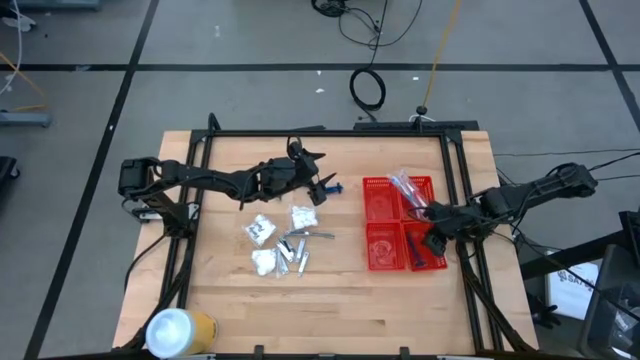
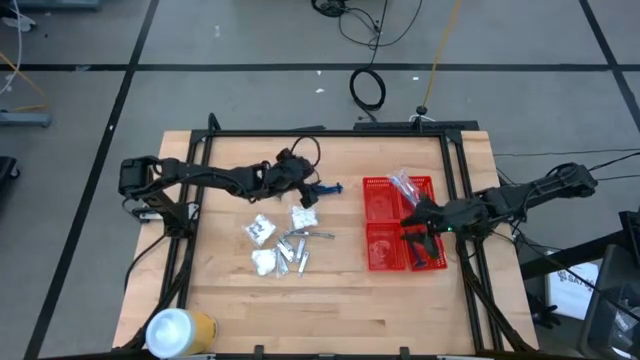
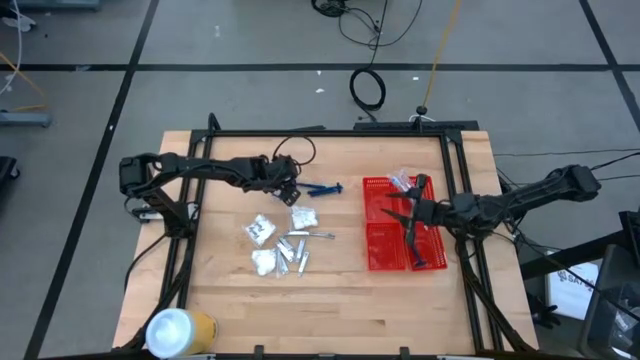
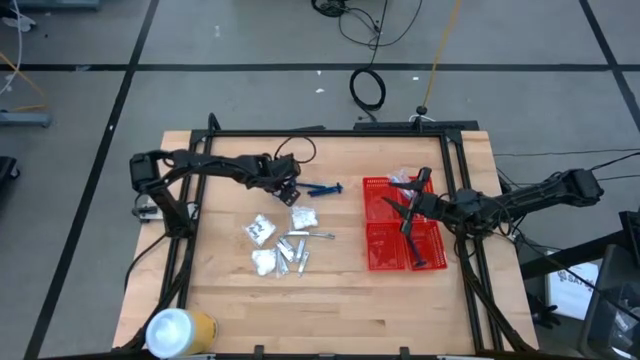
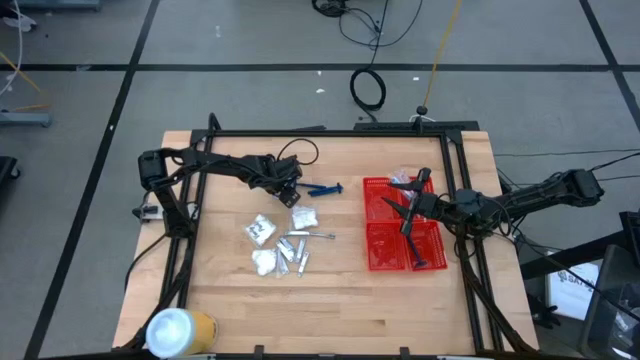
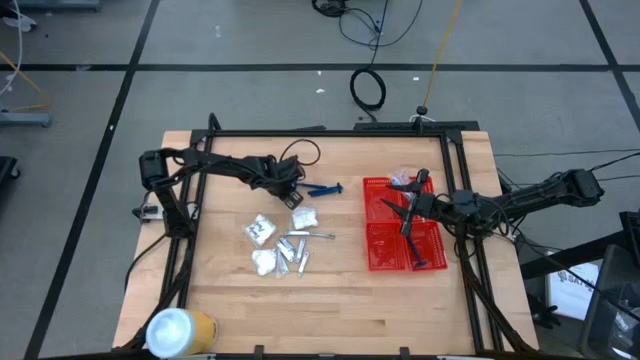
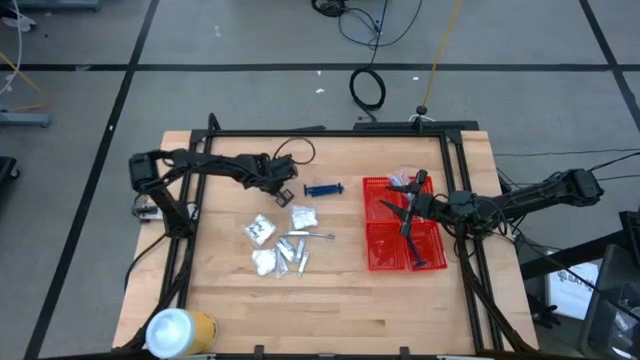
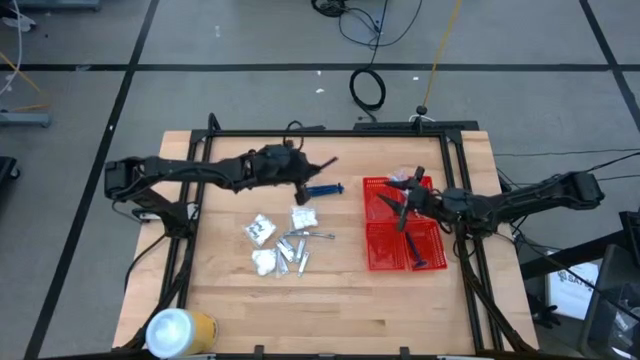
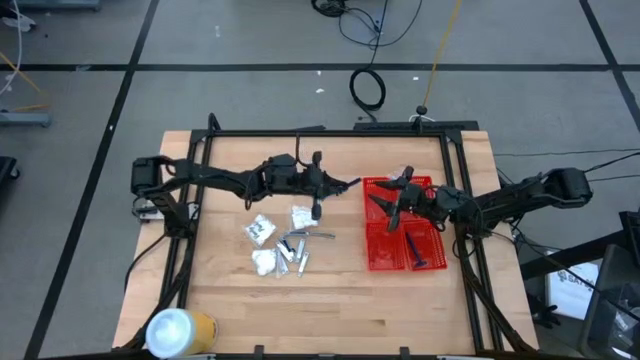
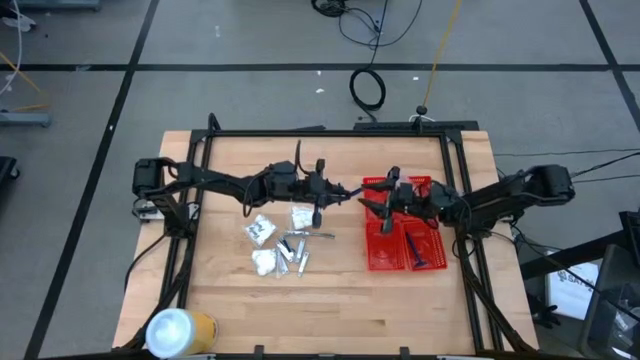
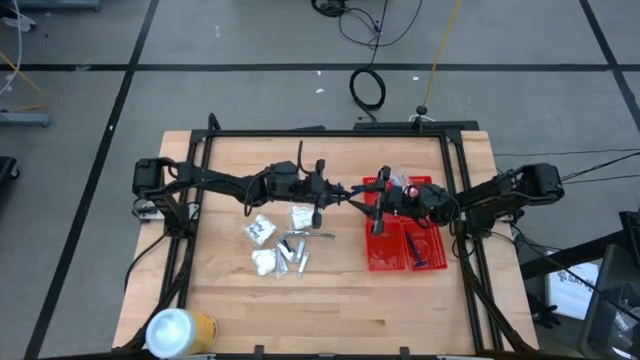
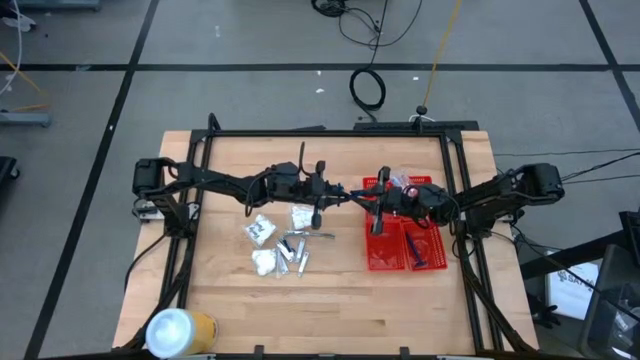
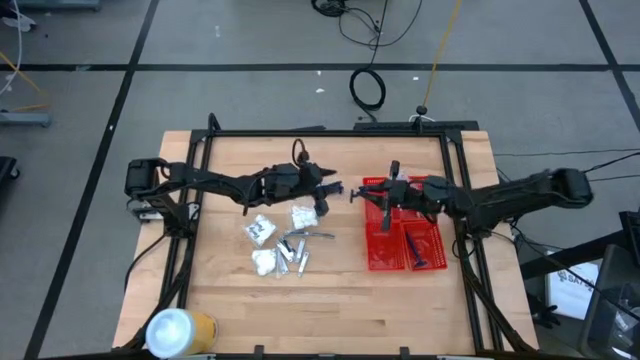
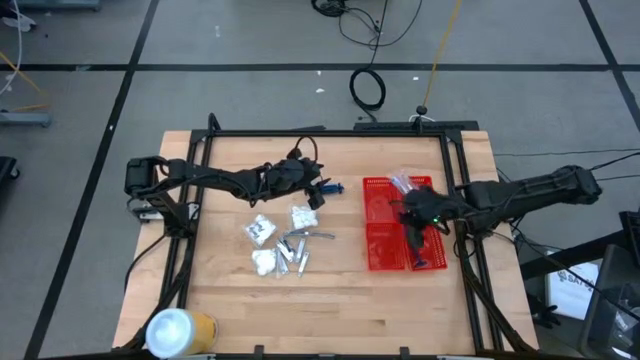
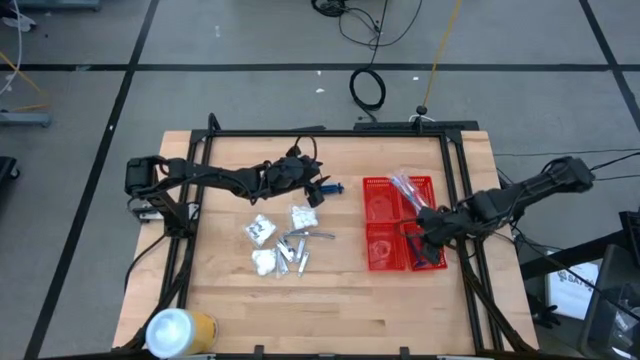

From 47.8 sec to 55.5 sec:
Task: Pick & Place Travel size toiletries
Put the razor into the bottom right red bin

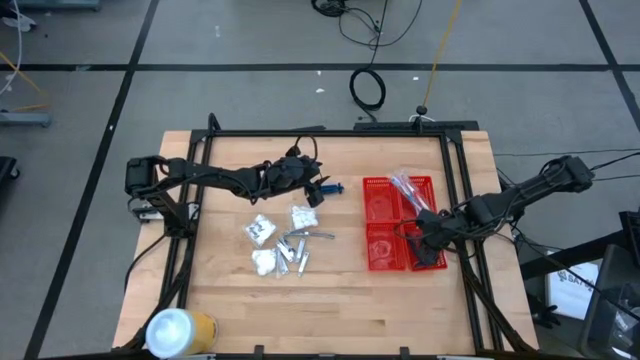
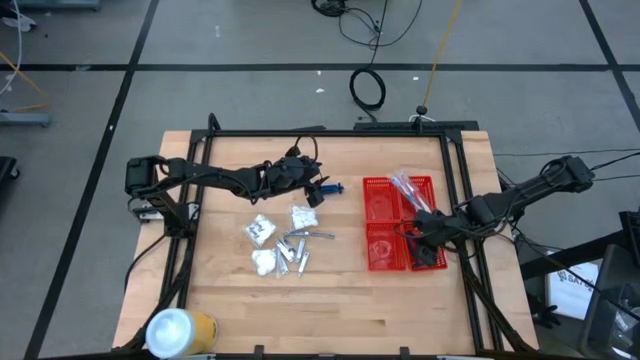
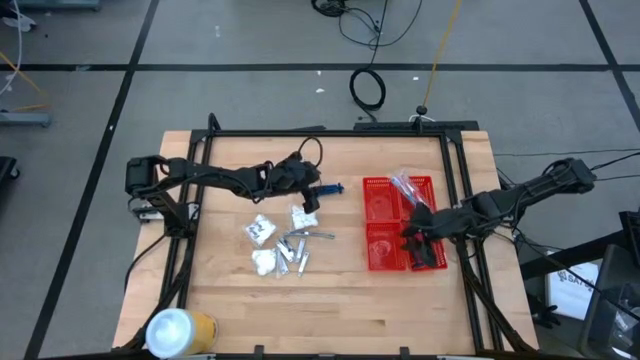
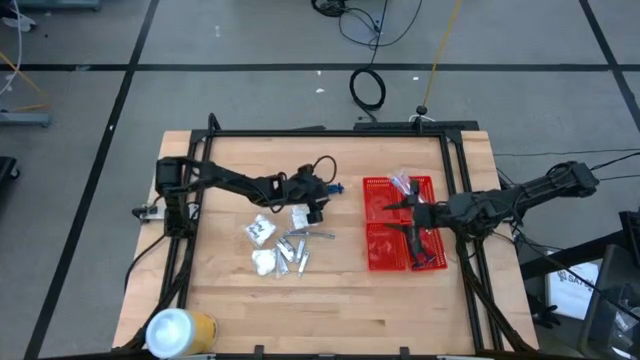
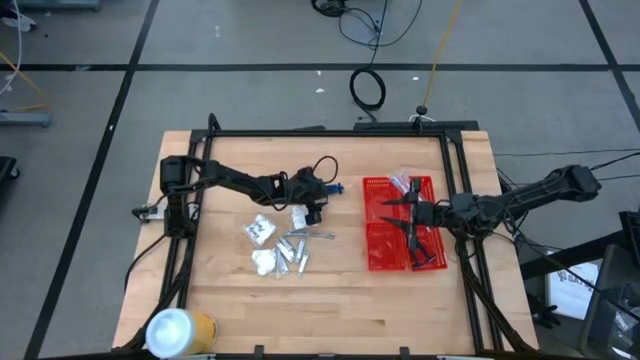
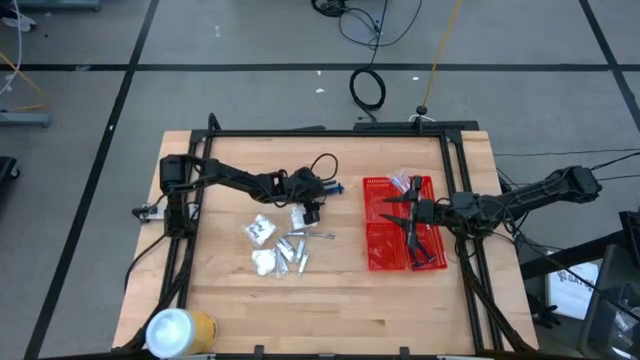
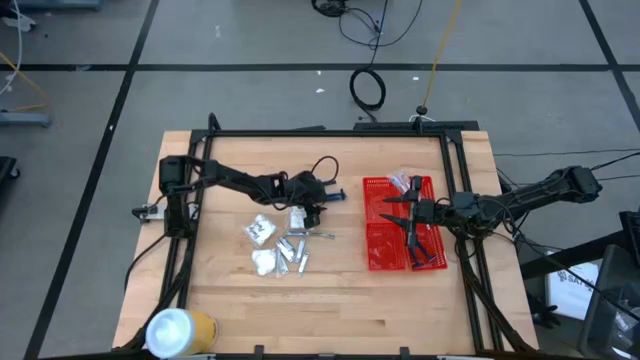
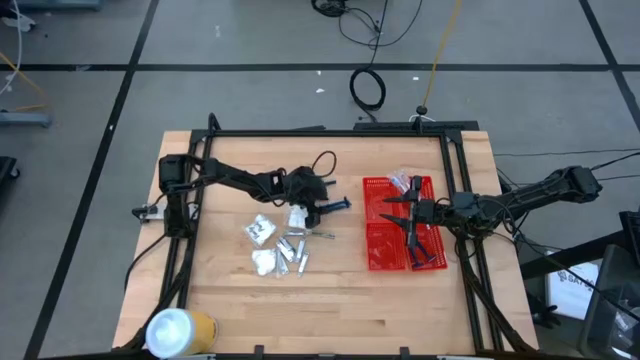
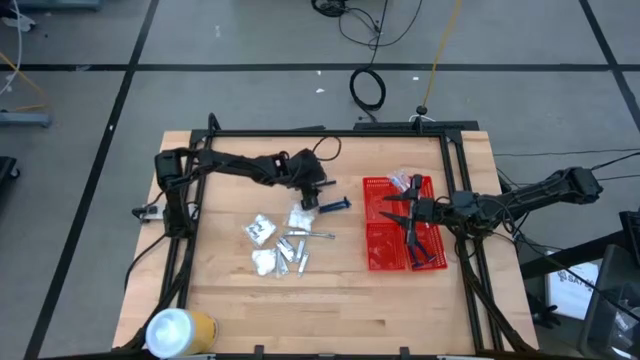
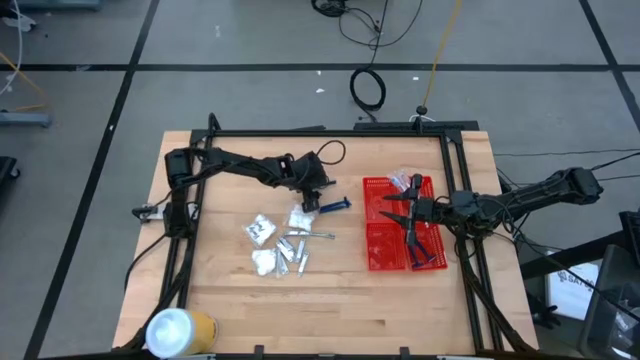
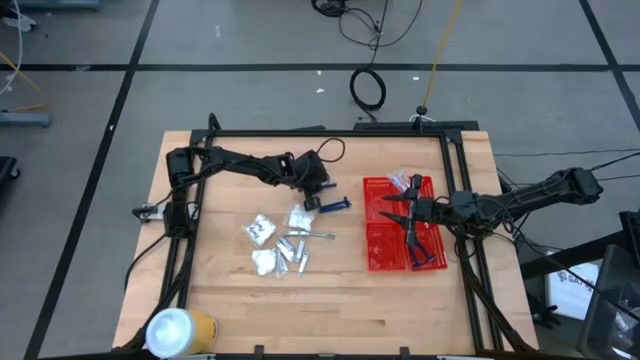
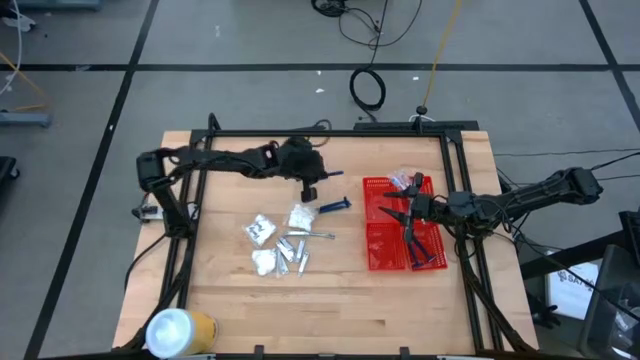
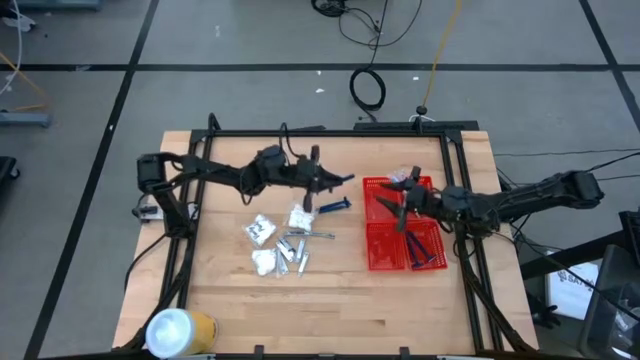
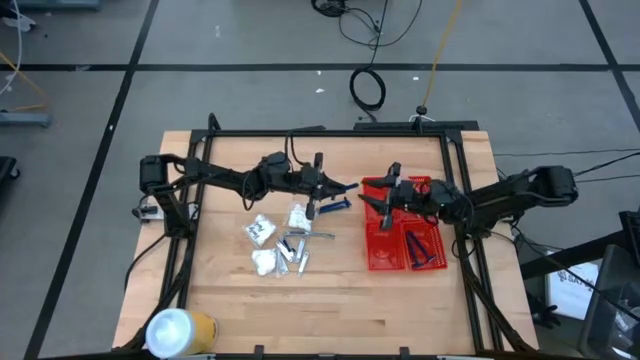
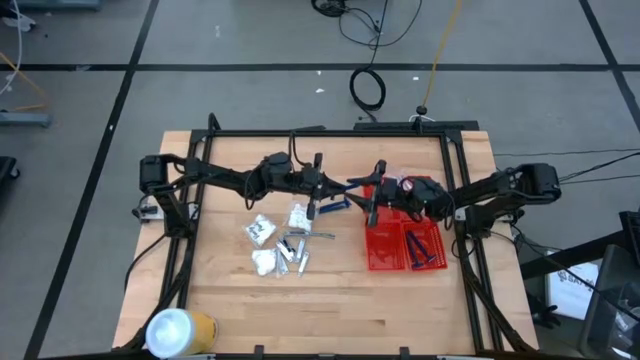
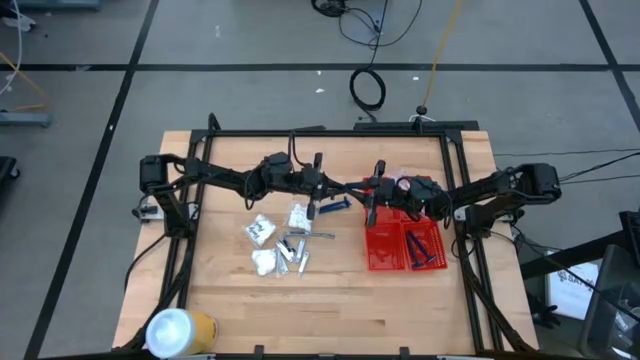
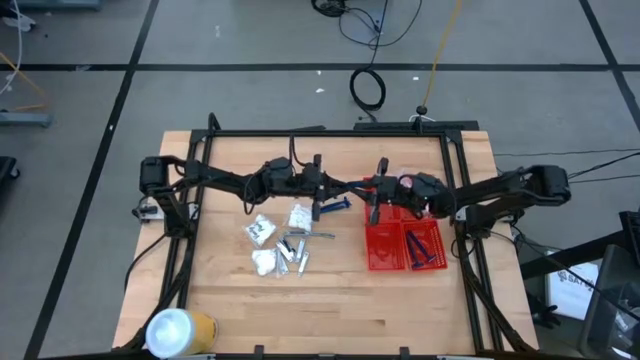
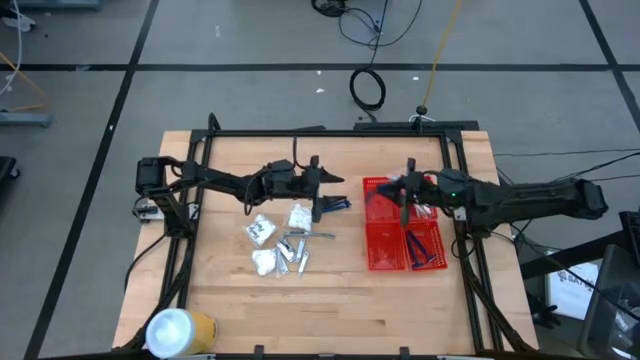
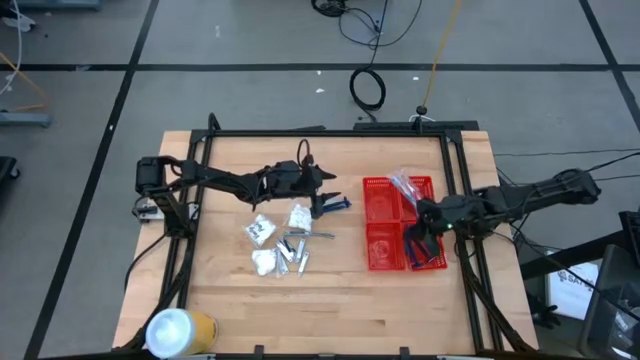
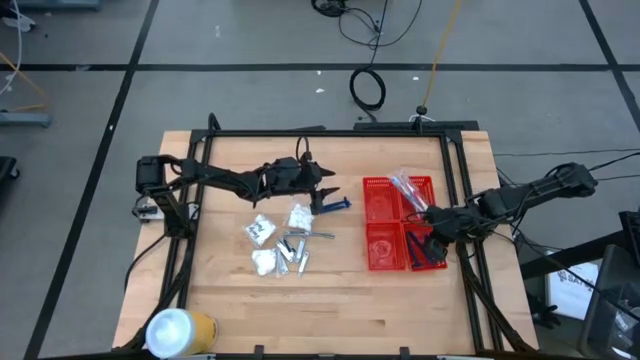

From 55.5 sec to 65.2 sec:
Put the razor into the bottom right red bin

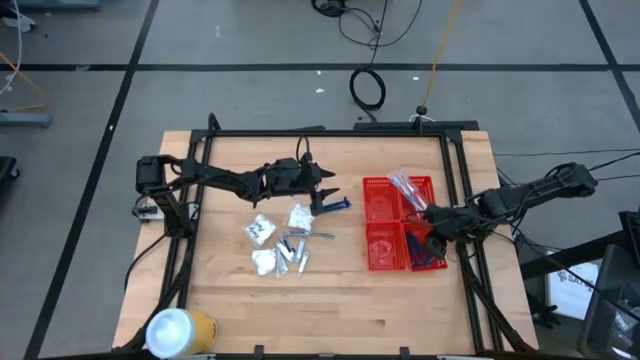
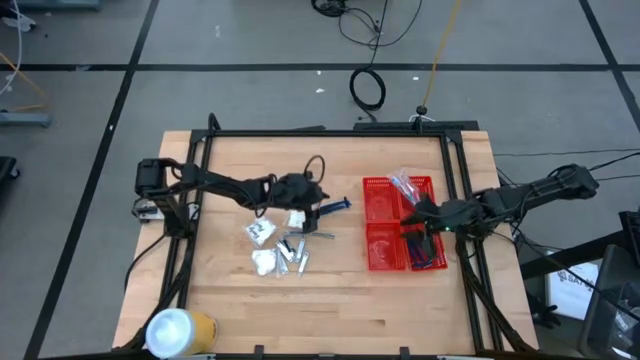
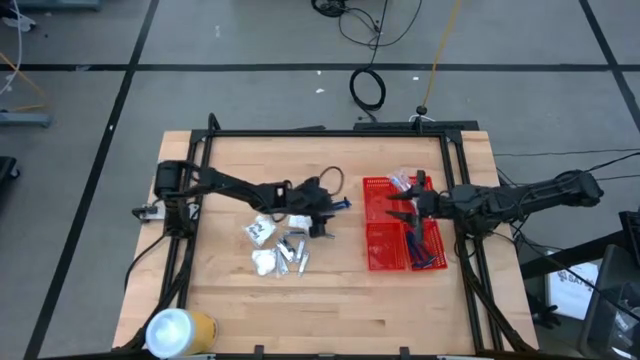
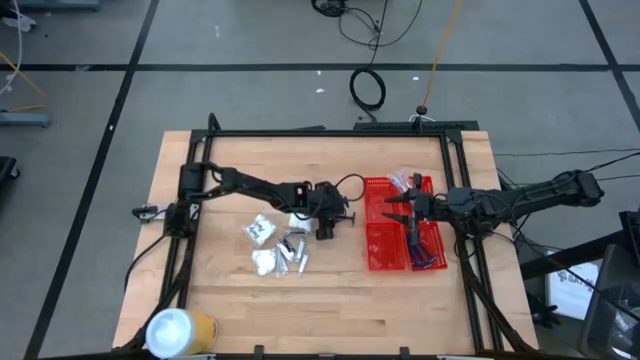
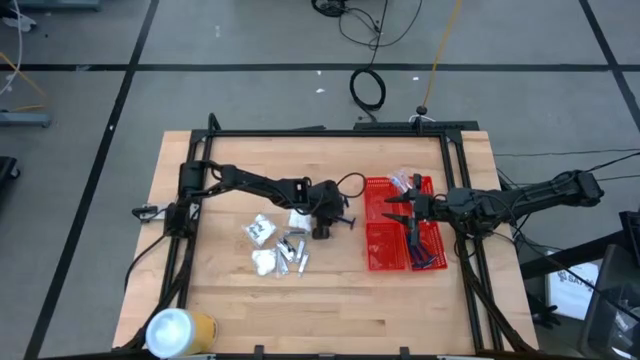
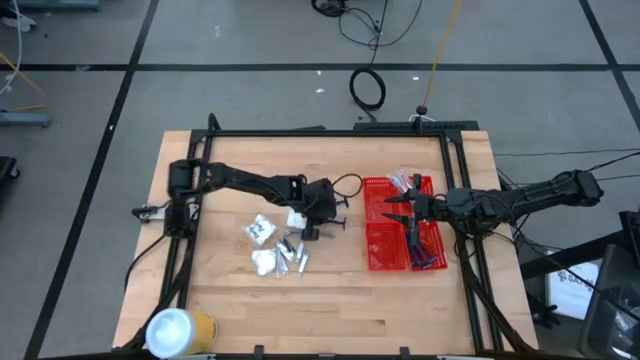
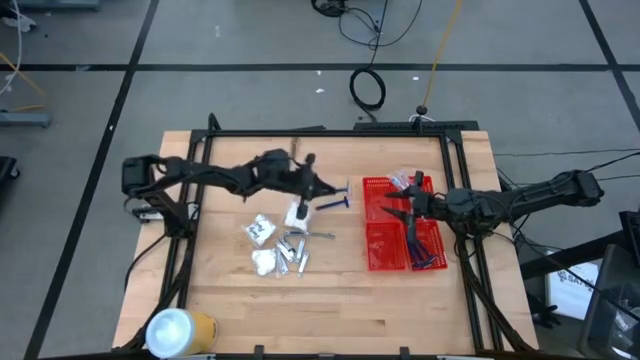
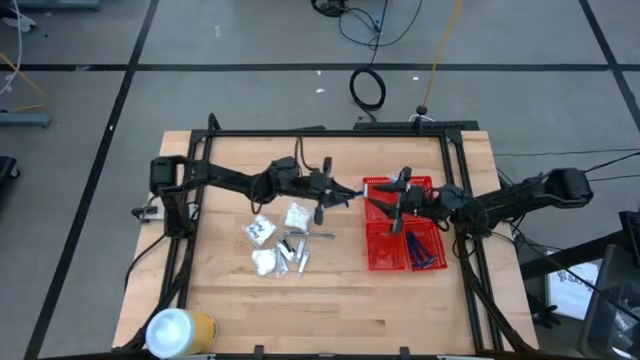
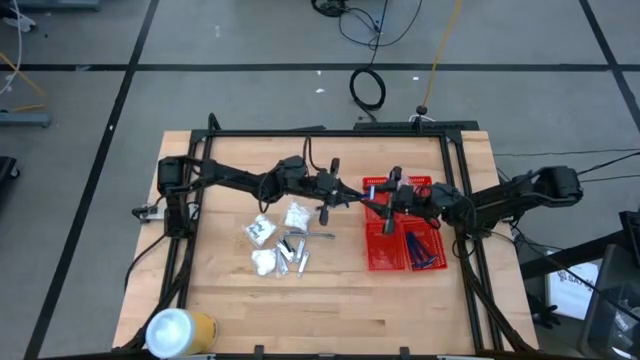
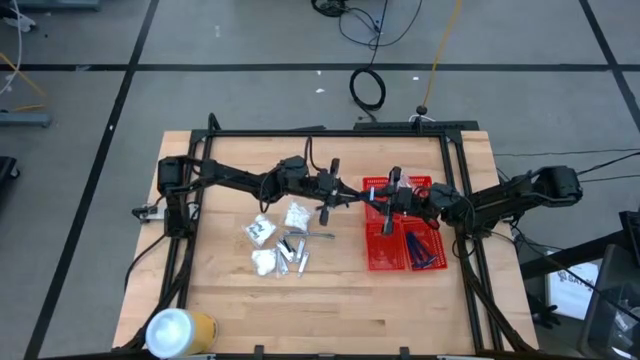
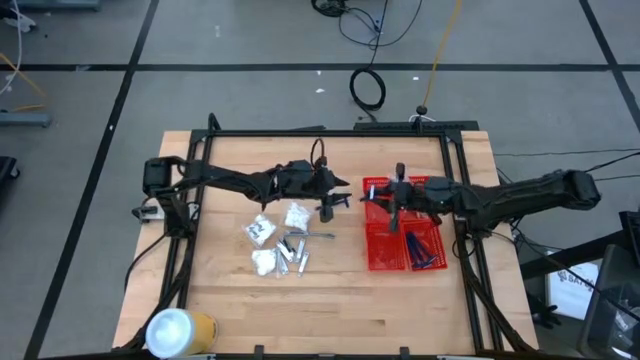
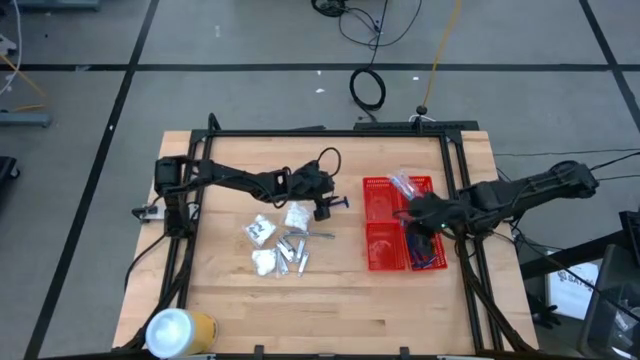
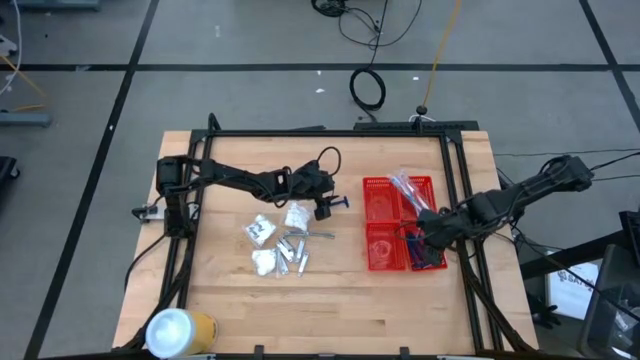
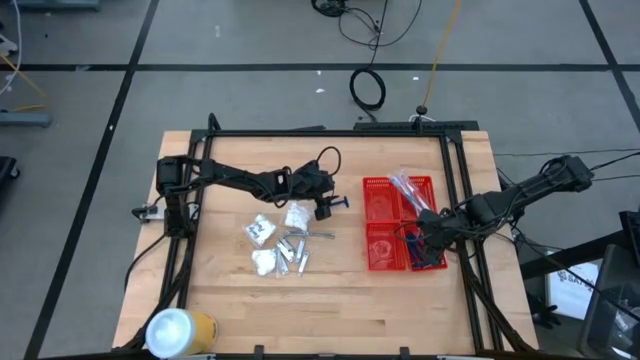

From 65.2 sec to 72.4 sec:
Put the razor into the bottom right red bin
